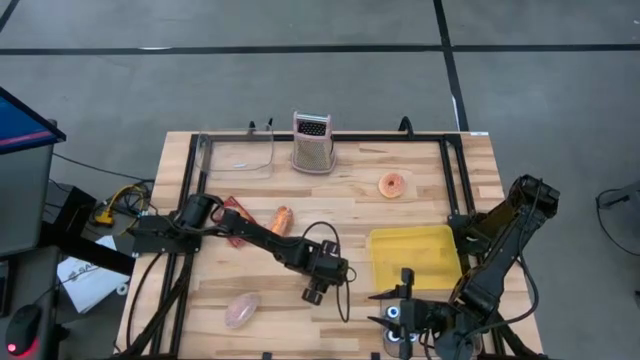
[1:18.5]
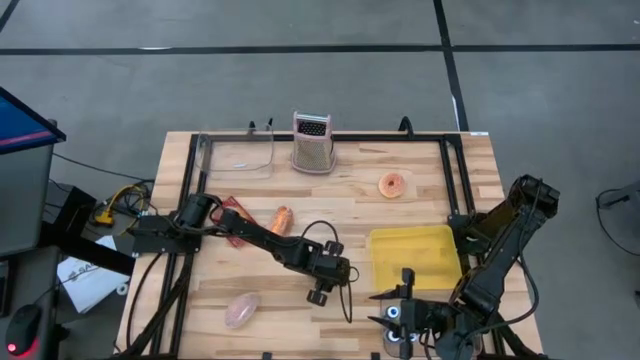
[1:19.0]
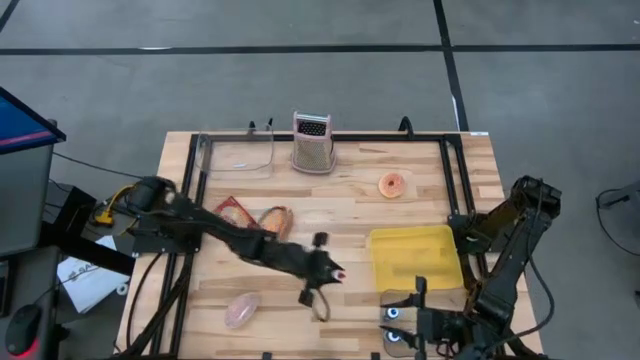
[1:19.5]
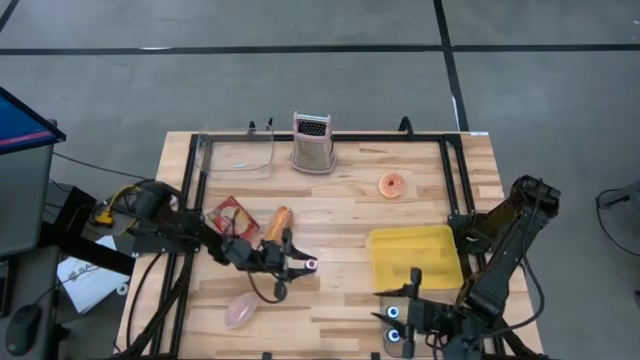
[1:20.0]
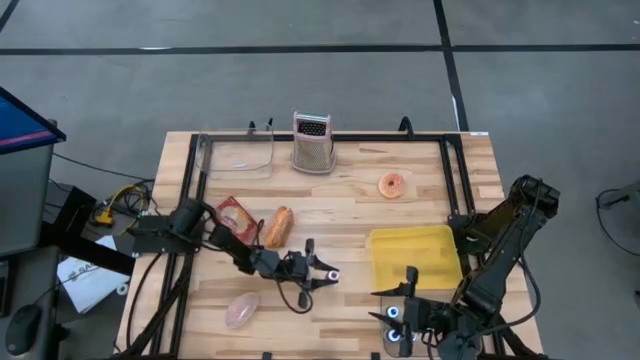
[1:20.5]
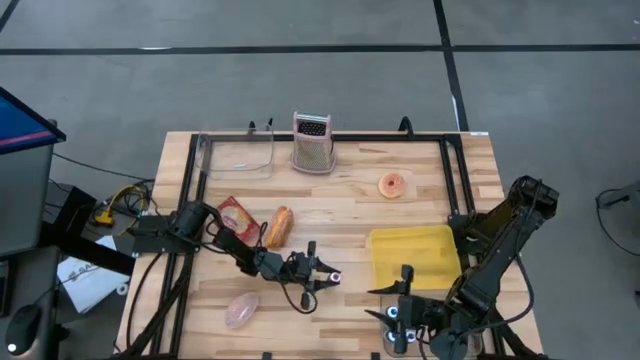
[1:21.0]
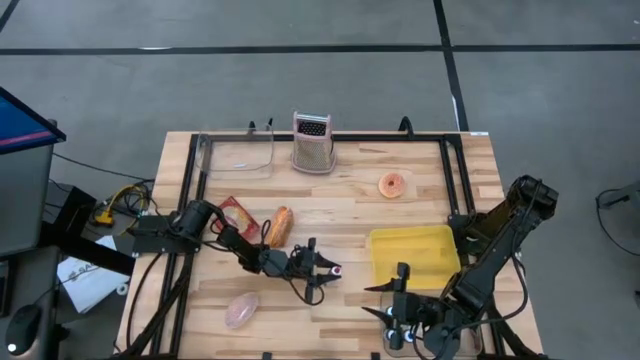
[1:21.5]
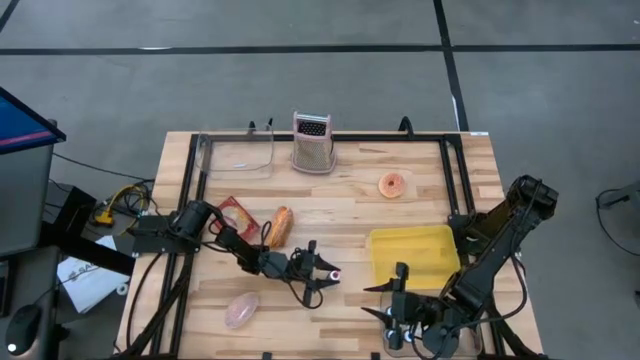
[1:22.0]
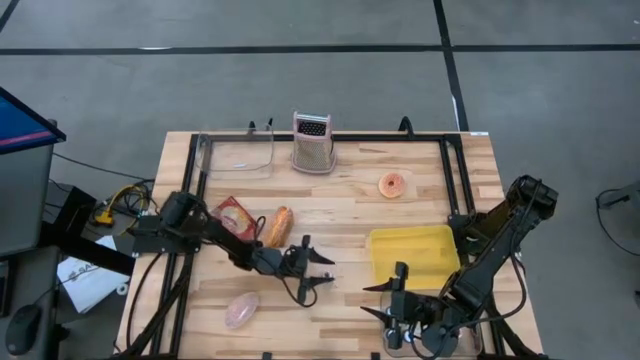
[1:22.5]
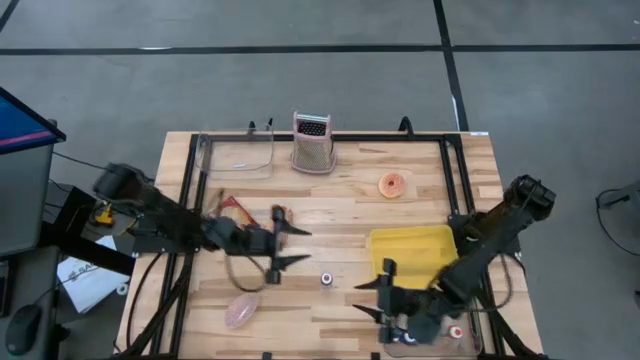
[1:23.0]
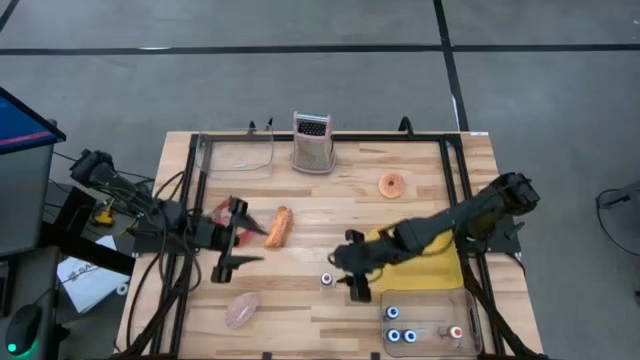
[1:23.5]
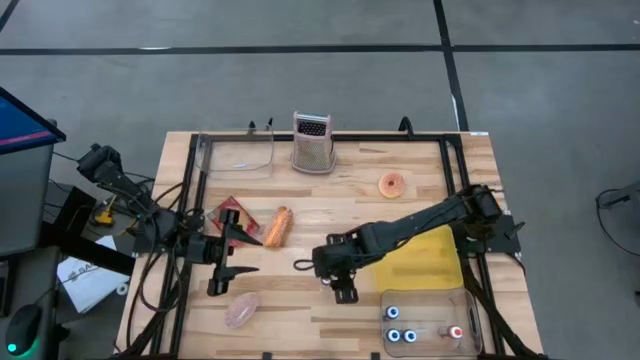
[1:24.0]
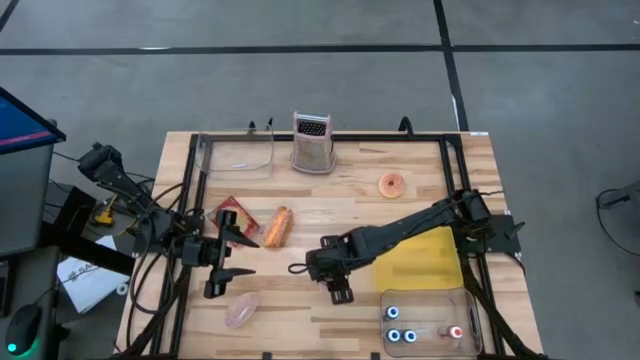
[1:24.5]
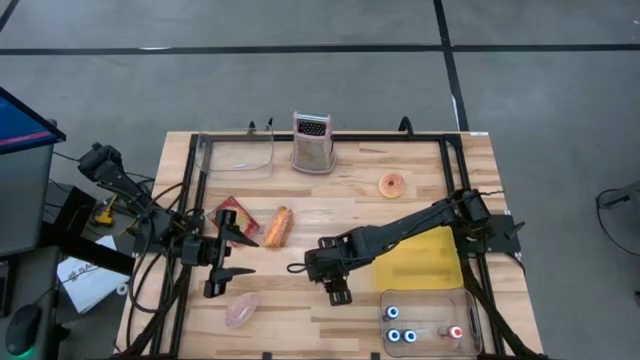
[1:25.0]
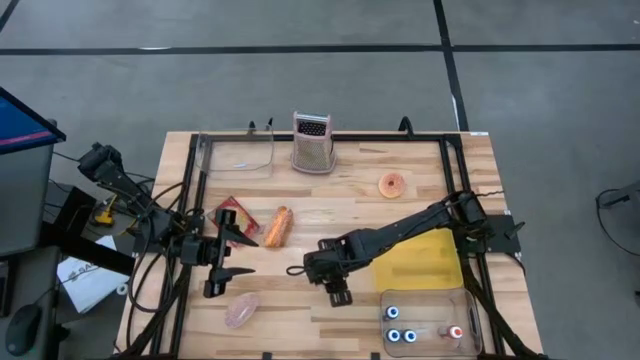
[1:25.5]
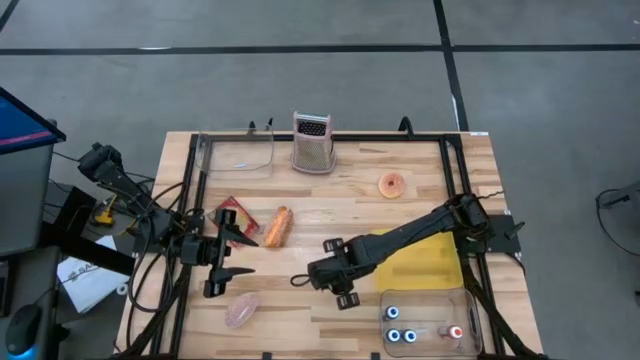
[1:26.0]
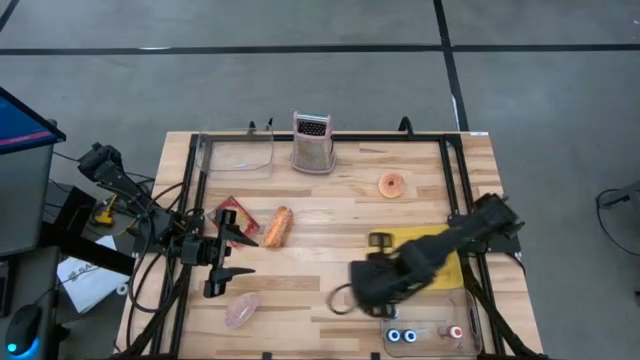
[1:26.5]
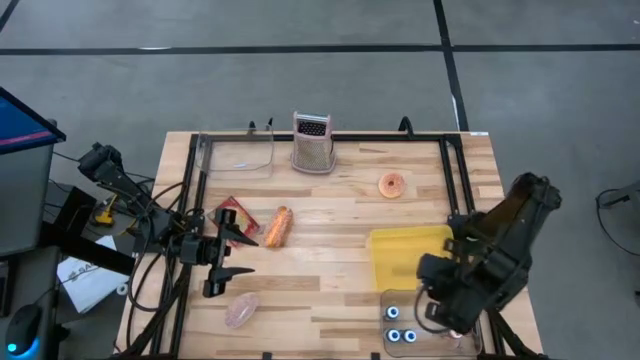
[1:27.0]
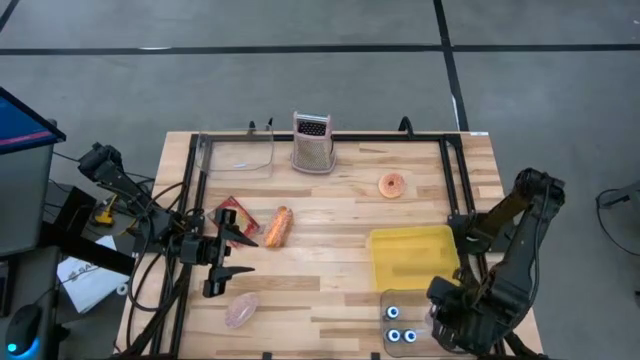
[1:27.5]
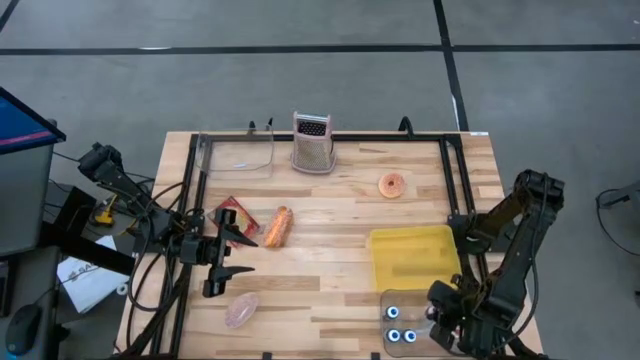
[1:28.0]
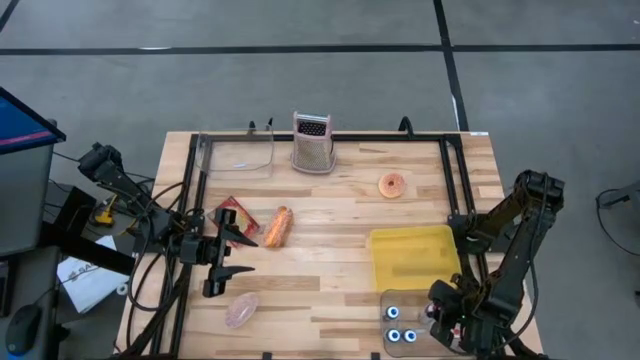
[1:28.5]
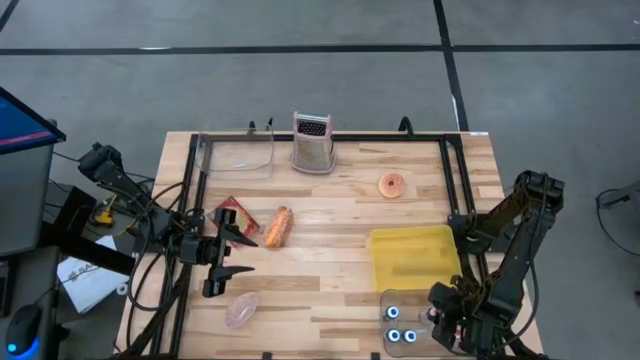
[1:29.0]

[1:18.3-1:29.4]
Task: Pick & Place Food Item
Put the red food coloring bottle into the bottom transparent bin

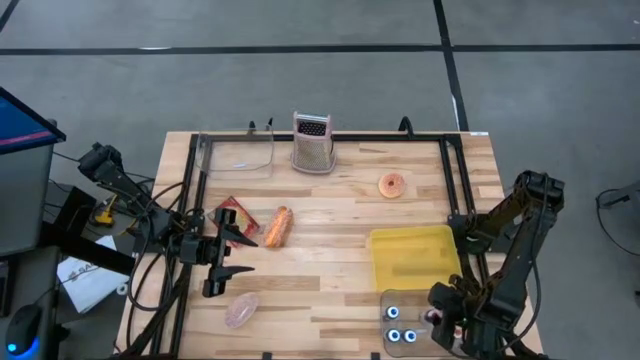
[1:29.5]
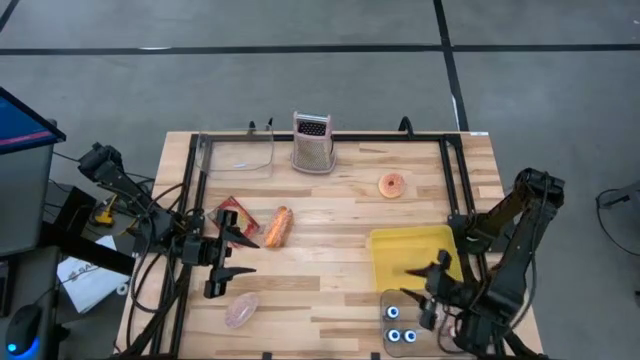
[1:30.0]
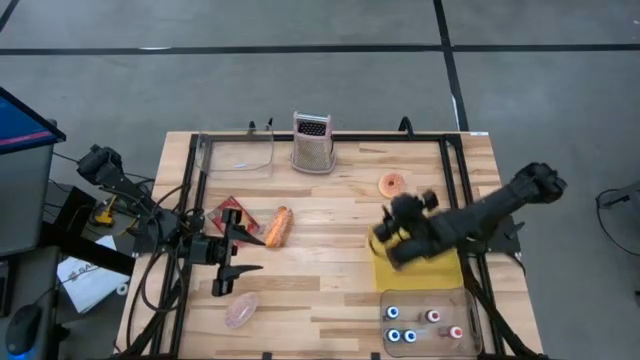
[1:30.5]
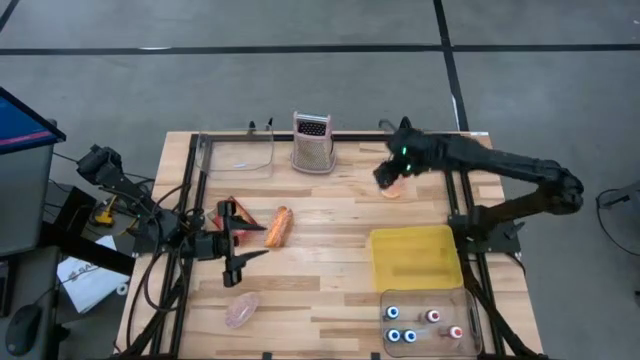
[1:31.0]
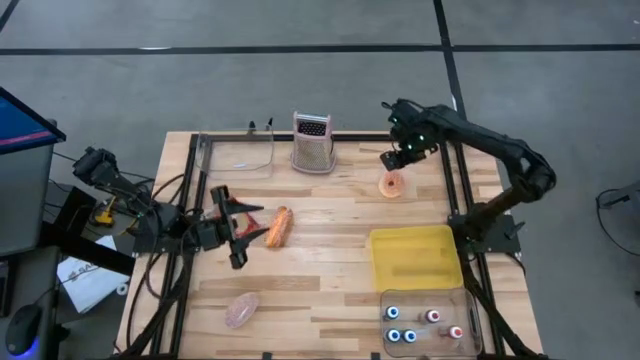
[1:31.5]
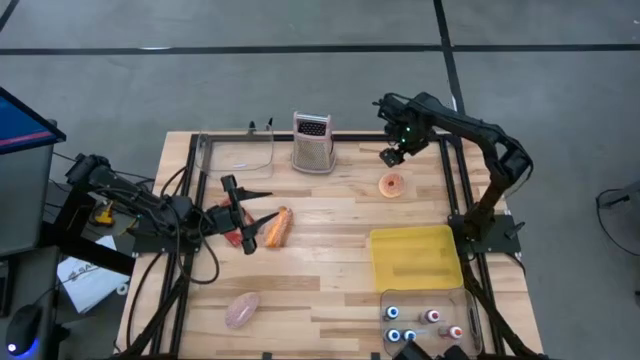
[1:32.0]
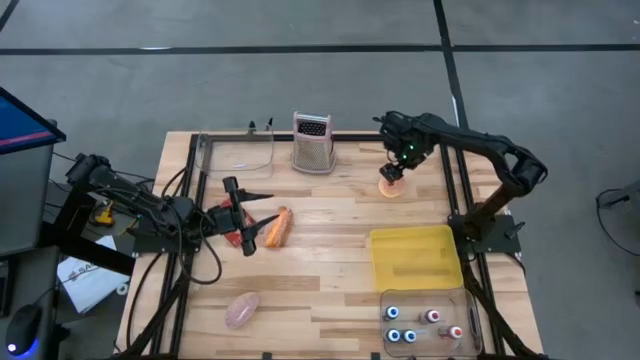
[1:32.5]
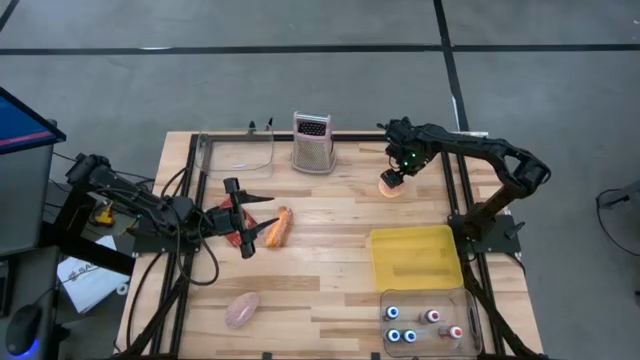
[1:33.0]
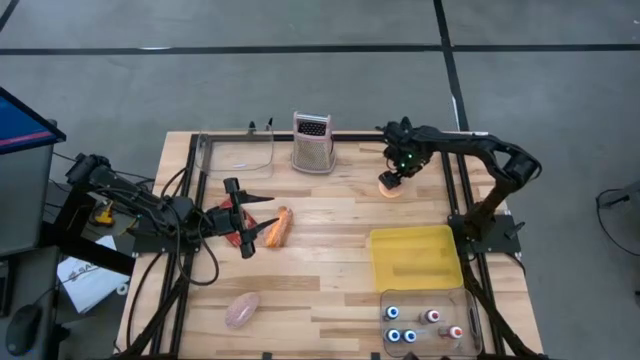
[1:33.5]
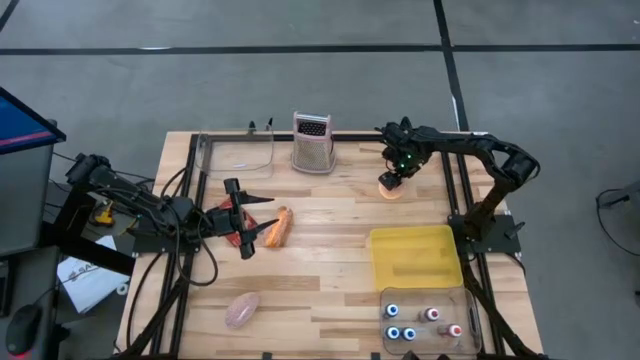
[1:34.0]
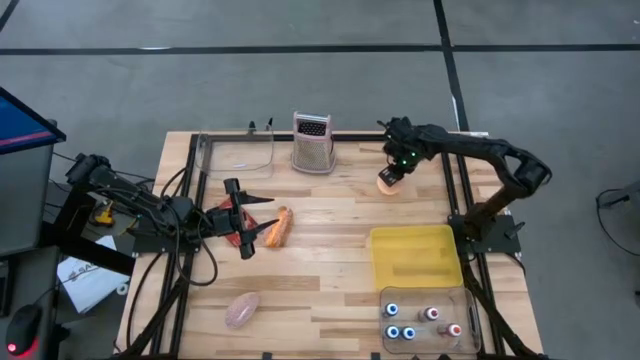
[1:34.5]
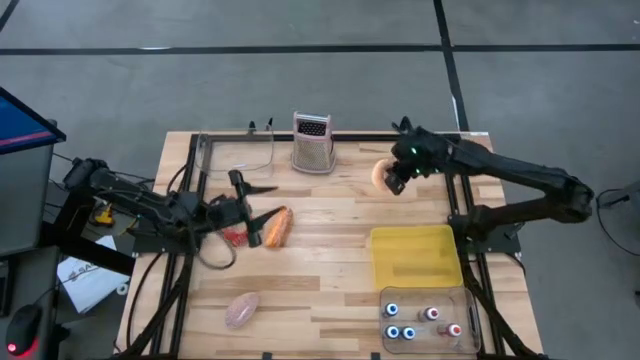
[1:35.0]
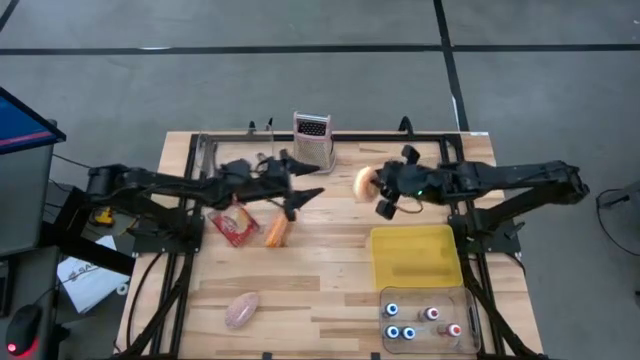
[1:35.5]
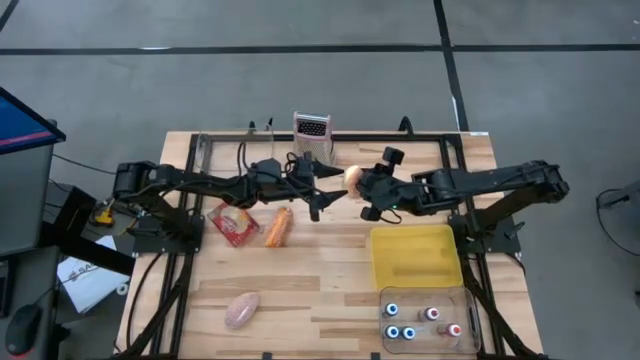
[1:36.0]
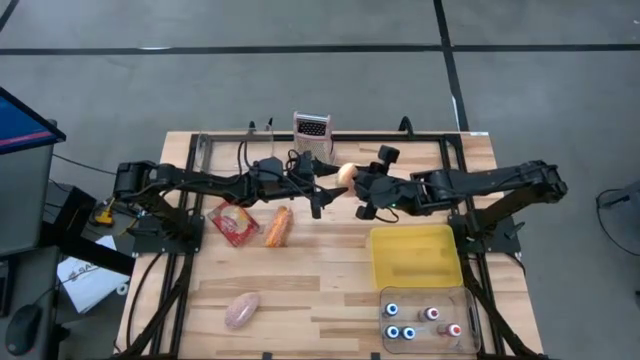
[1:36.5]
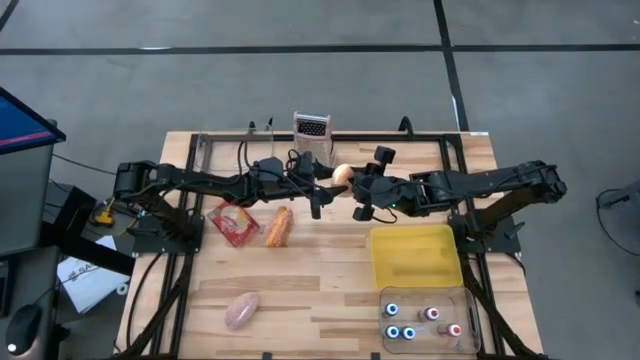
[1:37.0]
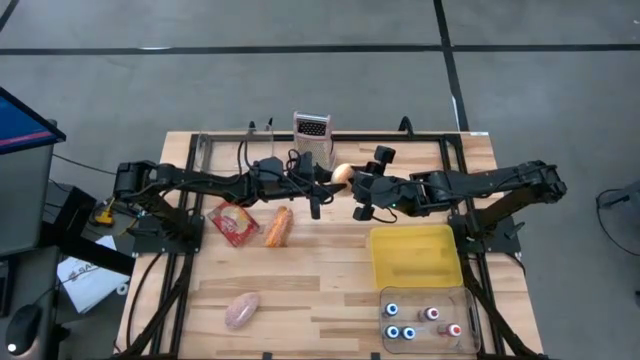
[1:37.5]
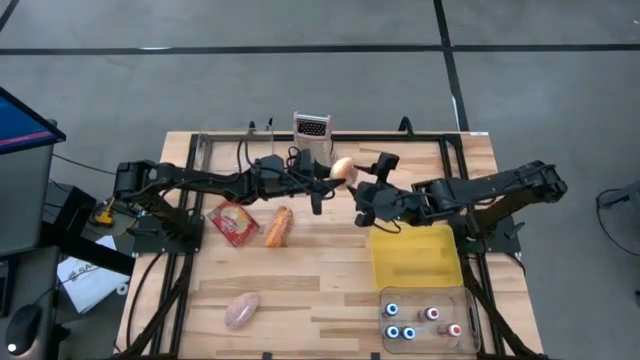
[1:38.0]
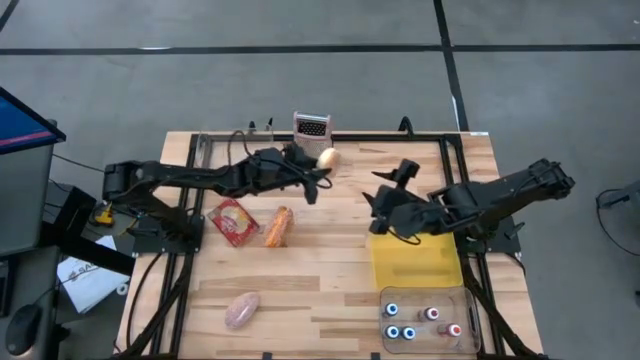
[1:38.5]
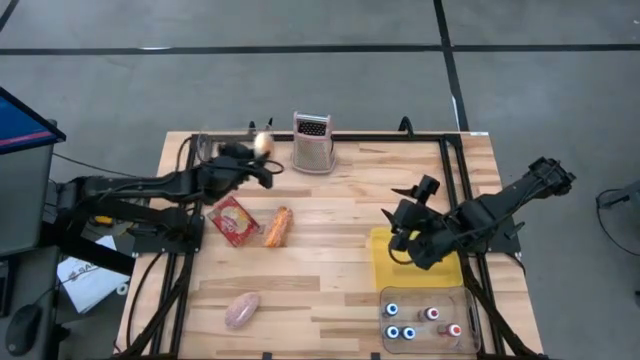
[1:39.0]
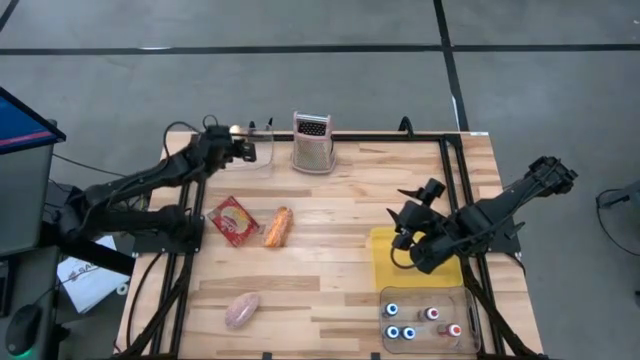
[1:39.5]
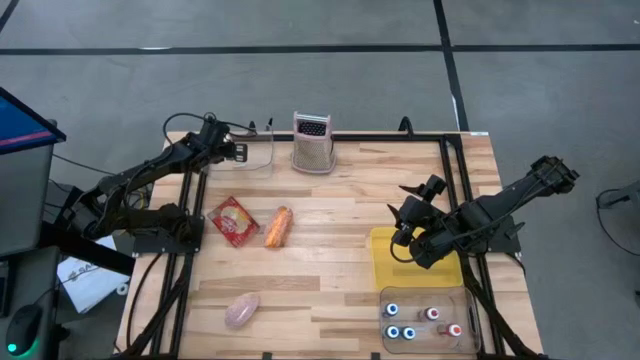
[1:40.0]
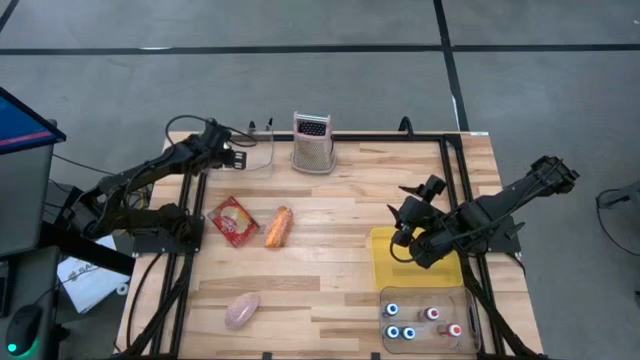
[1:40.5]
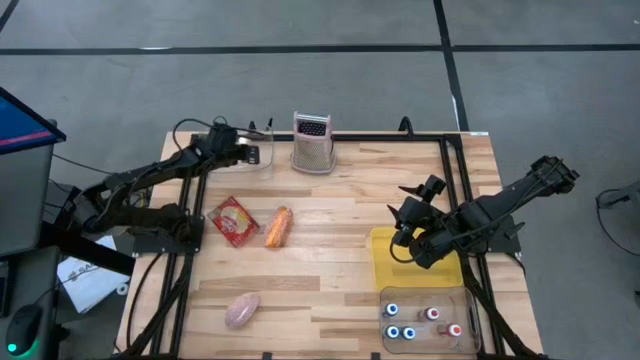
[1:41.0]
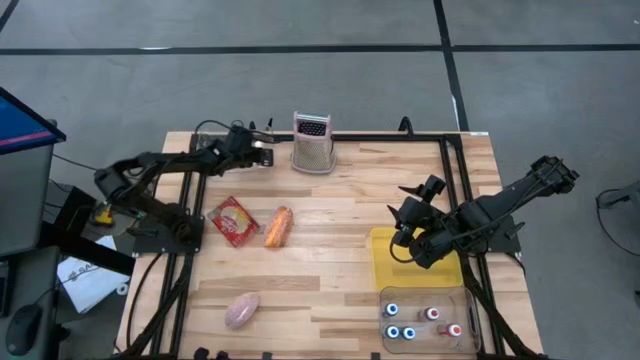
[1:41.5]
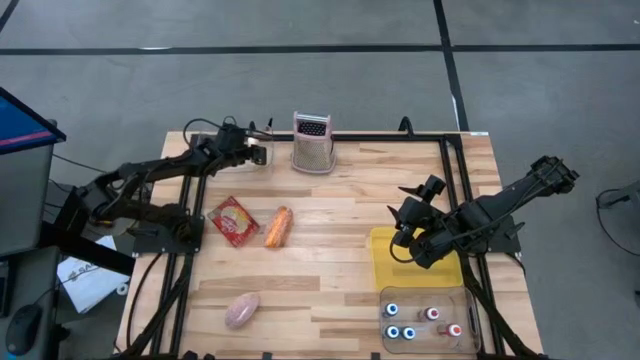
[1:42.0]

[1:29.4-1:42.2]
Put the brown donut into the top transparent bin
